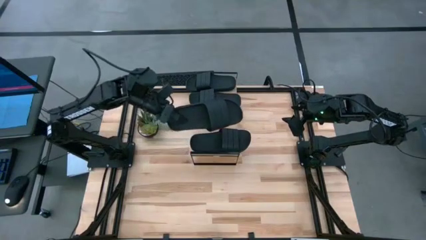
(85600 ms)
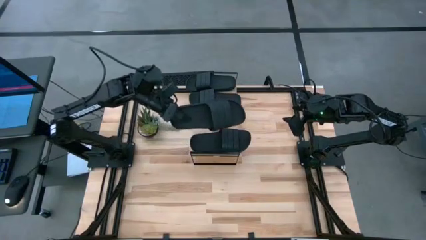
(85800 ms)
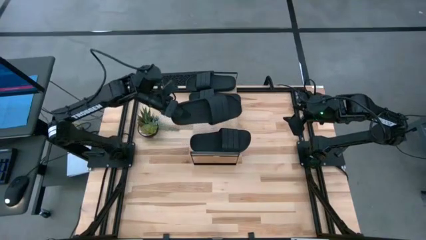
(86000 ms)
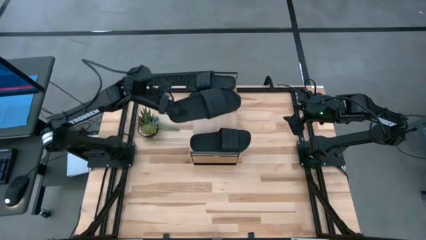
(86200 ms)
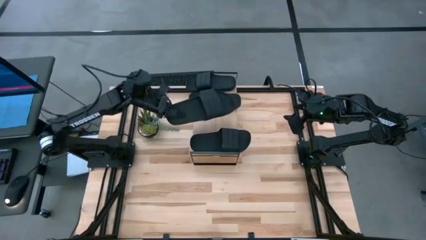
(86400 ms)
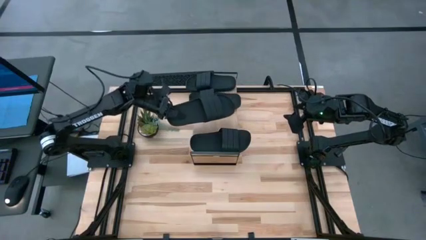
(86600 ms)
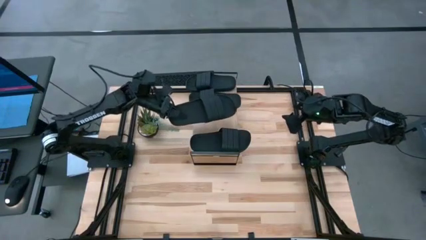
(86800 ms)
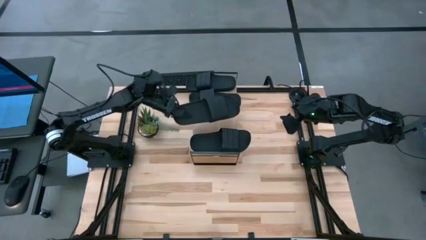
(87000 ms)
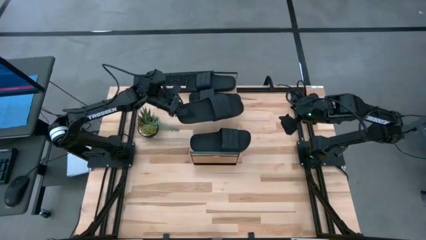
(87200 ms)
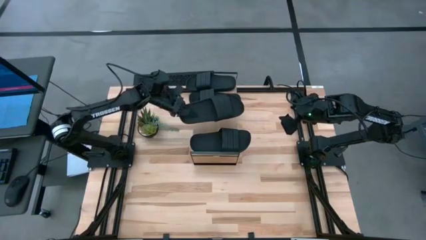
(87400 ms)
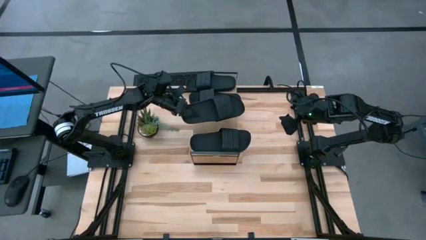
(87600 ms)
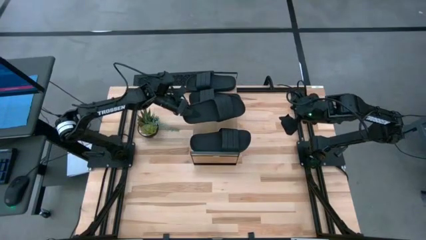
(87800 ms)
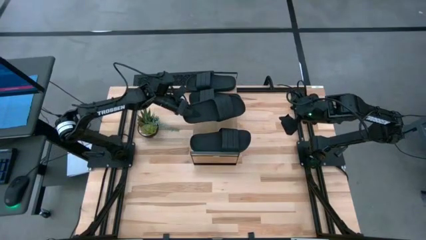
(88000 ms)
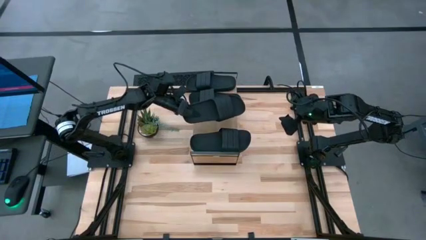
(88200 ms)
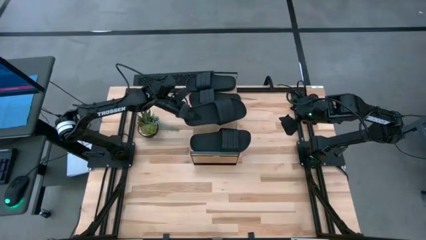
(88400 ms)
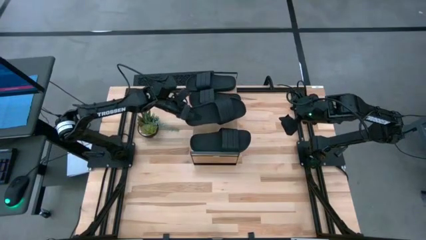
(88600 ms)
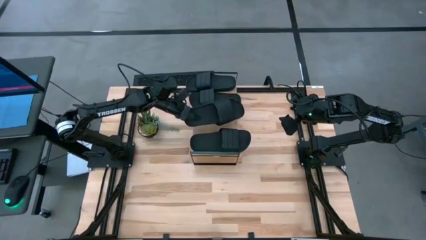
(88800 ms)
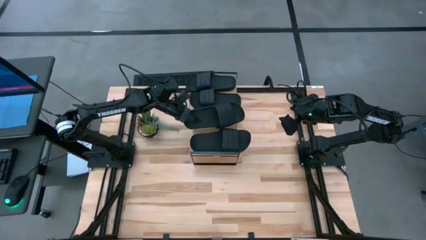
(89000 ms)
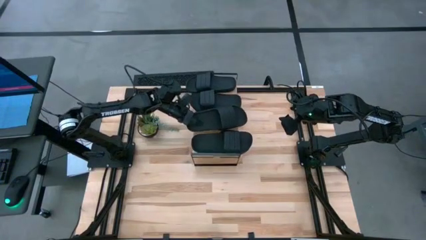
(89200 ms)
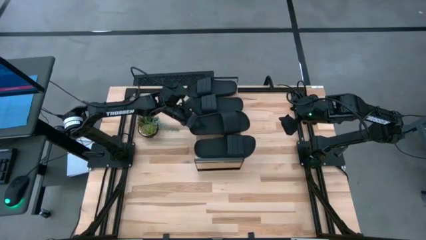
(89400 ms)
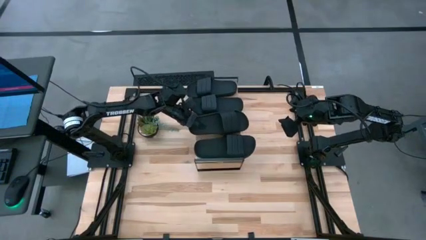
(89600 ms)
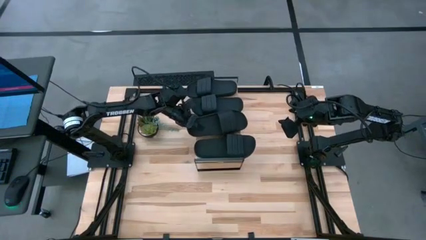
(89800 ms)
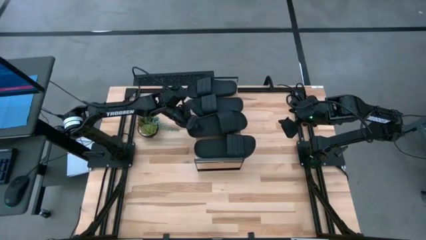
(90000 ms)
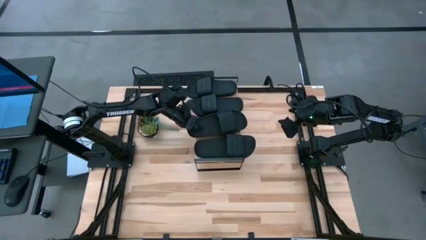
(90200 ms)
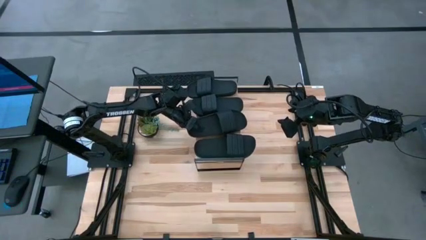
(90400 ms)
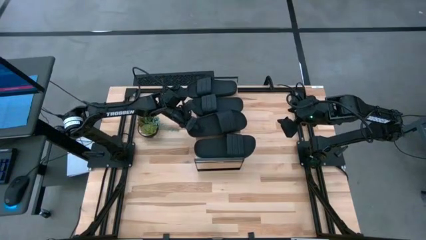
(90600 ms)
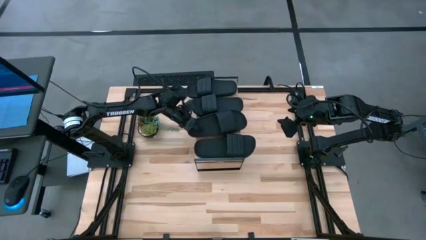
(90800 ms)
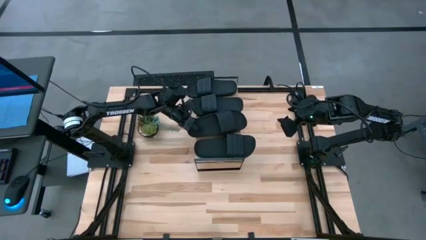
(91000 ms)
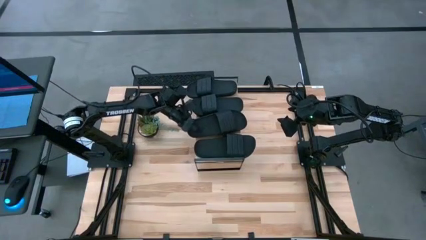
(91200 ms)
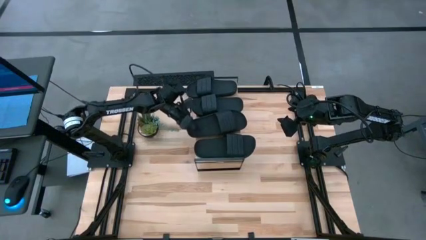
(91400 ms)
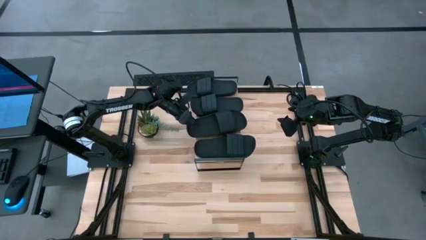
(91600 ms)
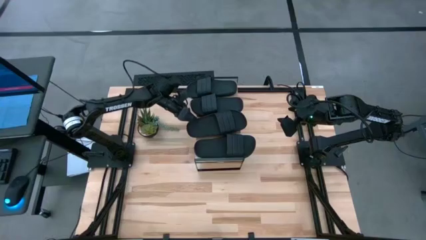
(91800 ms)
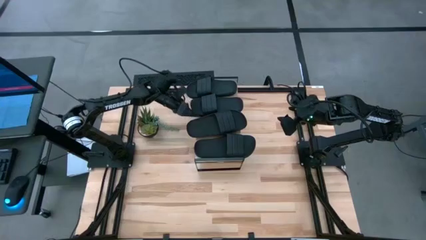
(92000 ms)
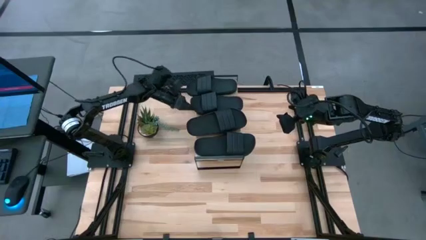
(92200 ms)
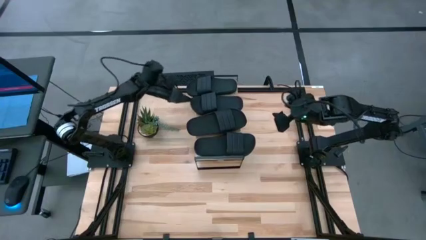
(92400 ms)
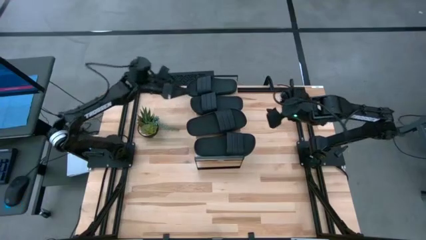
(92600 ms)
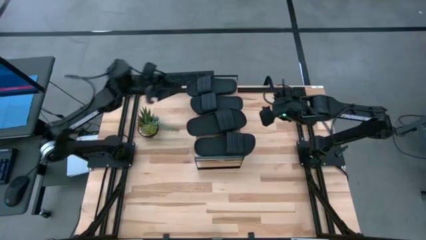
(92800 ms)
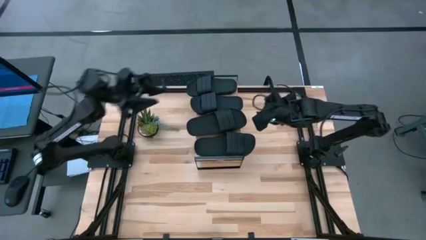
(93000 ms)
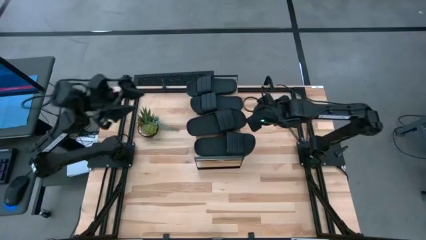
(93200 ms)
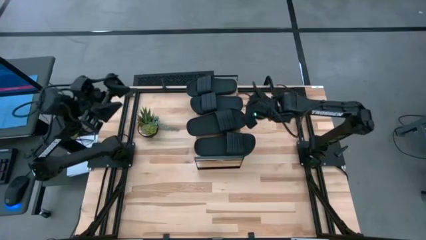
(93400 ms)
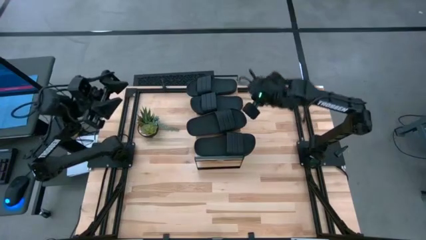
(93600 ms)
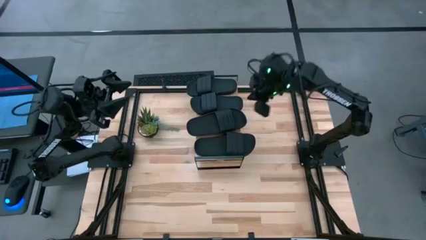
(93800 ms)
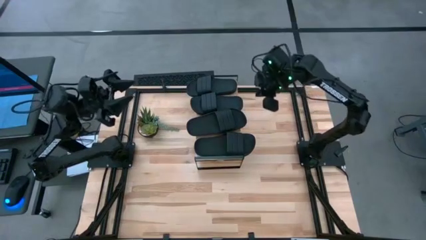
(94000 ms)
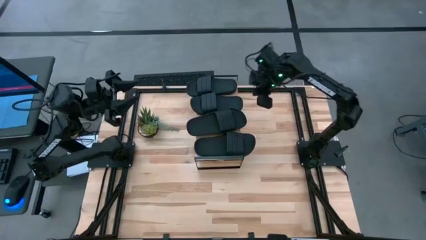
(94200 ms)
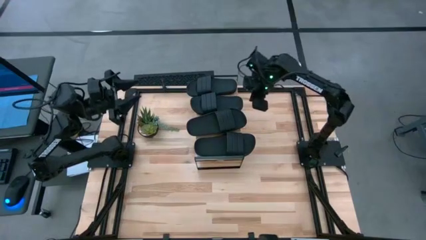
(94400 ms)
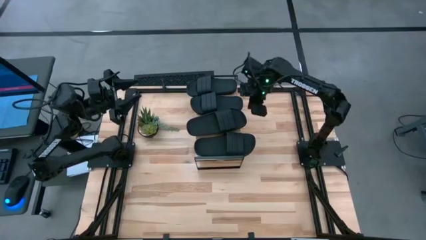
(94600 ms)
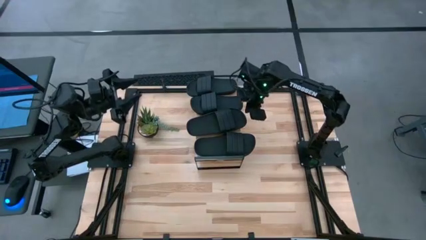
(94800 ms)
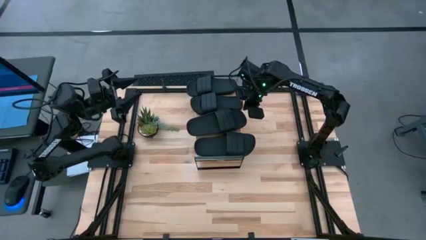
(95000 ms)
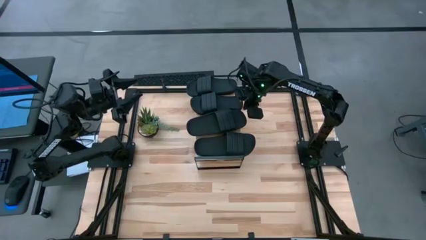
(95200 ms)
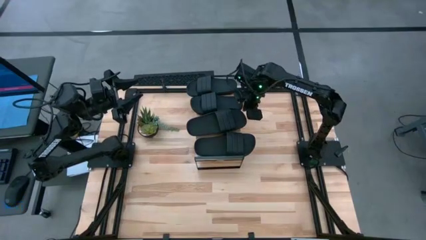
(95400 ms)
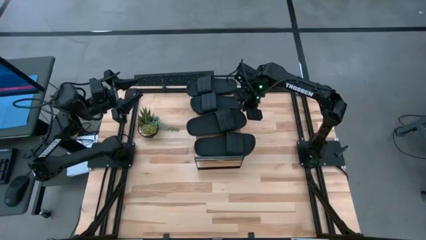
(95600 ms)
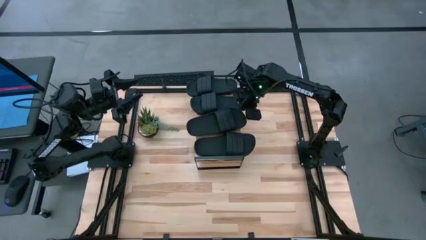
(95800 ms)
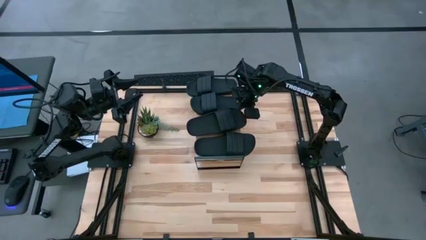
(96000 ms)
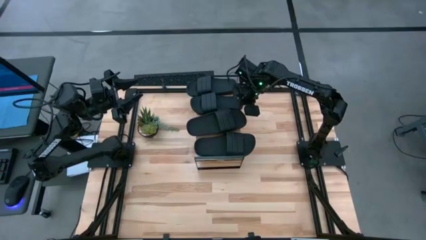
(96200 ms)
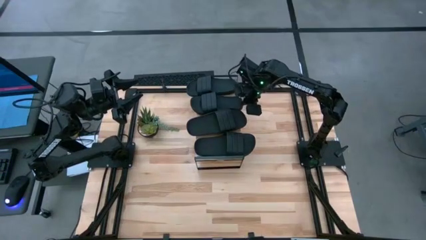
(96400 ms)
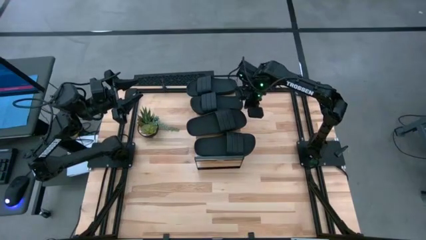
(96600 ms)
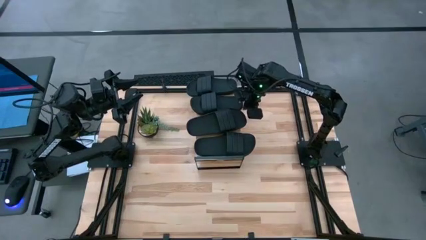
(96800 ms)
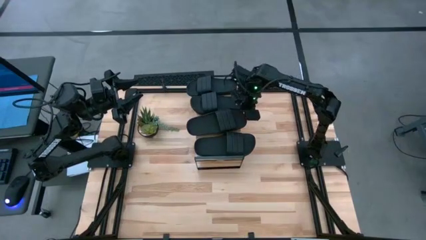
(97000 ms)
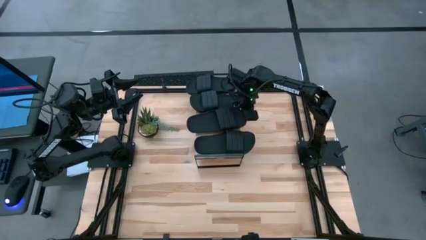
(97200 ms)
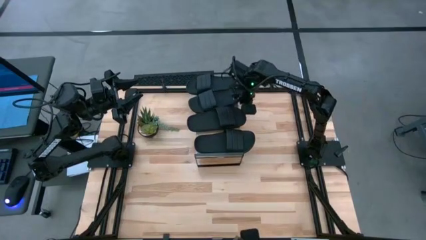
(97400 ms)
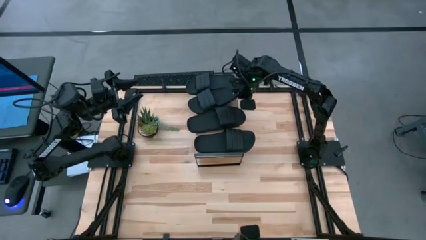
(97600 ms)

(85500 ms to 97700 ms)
Task: Pick and place slides into the shelf
Put the black slide on the shelf
